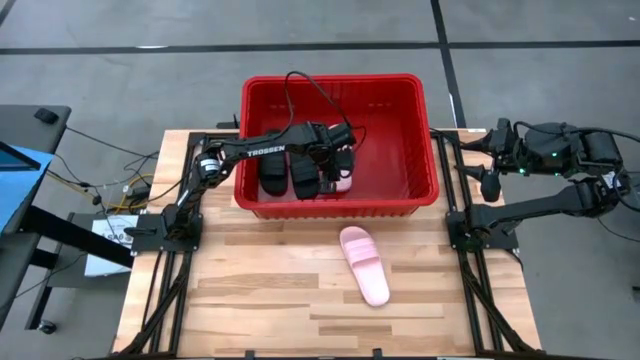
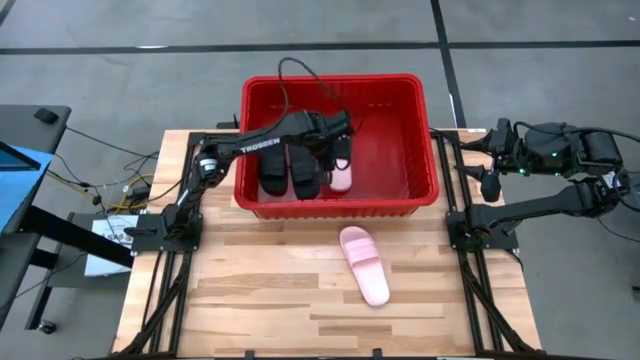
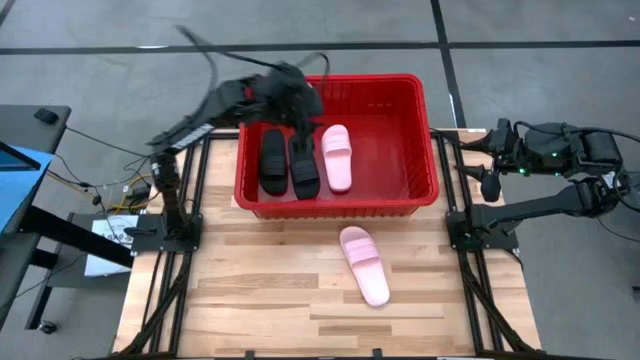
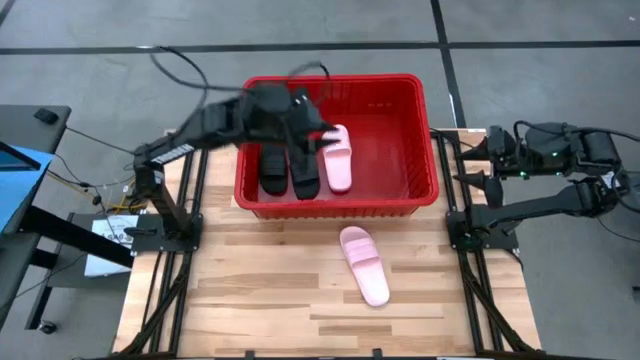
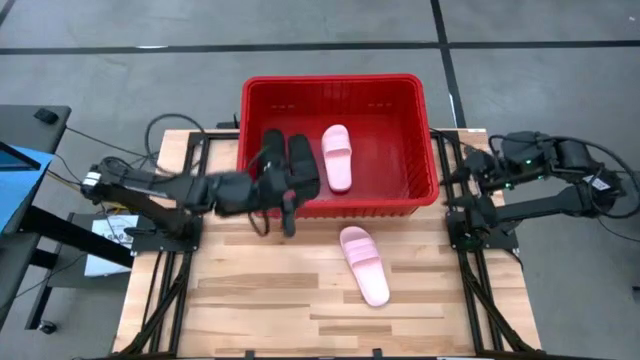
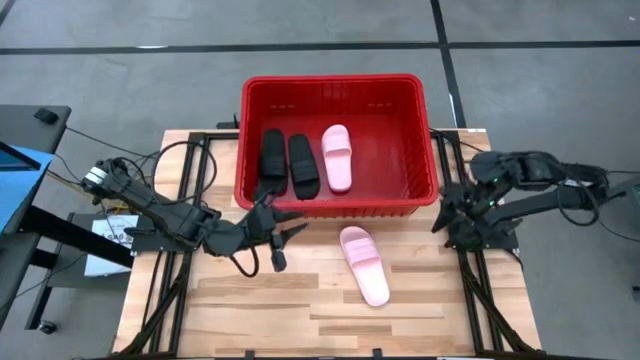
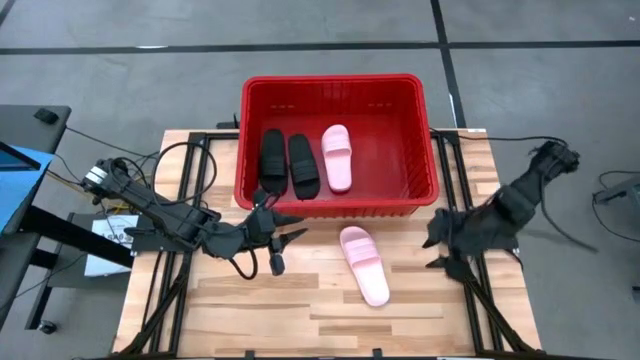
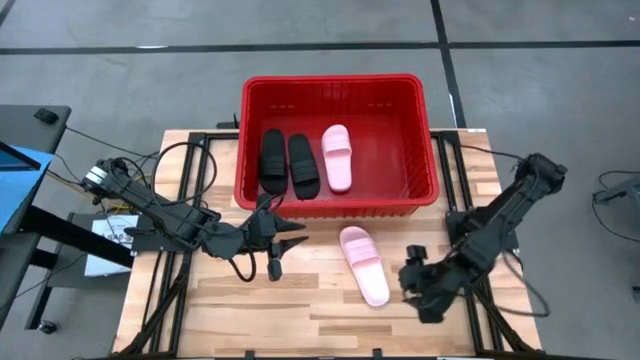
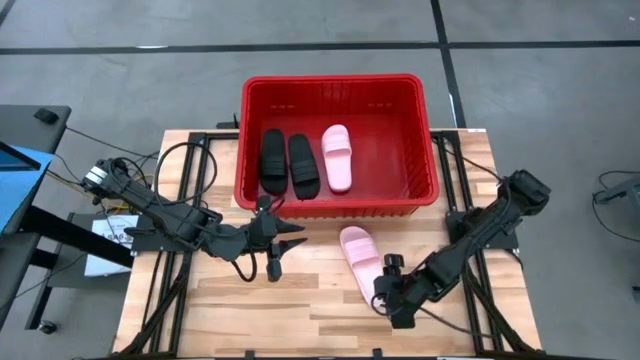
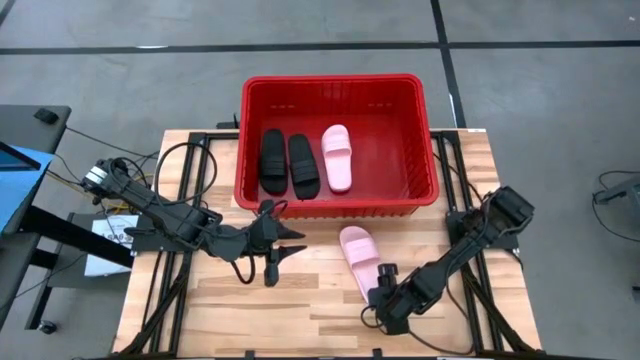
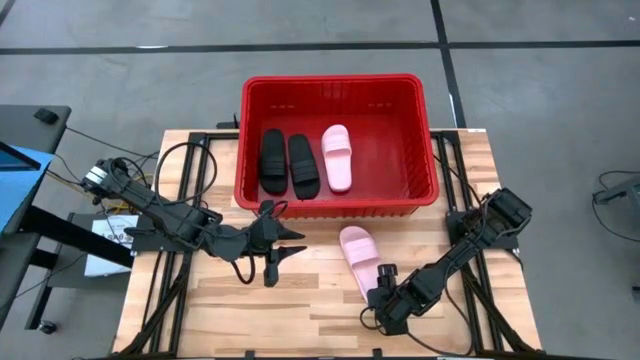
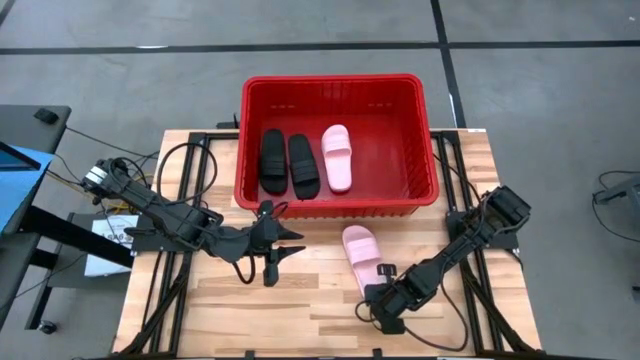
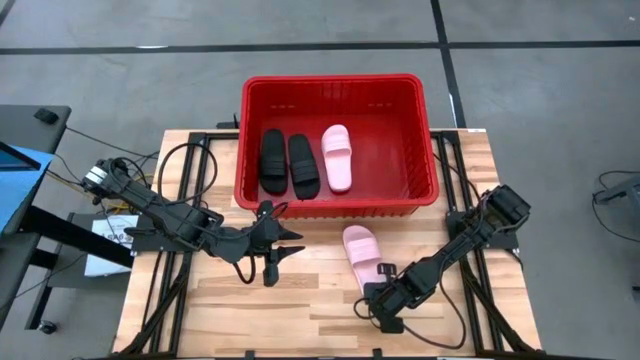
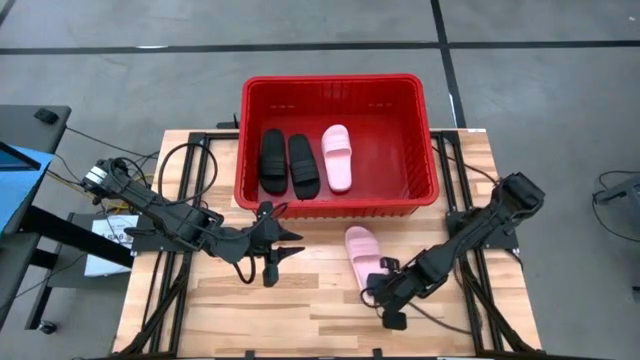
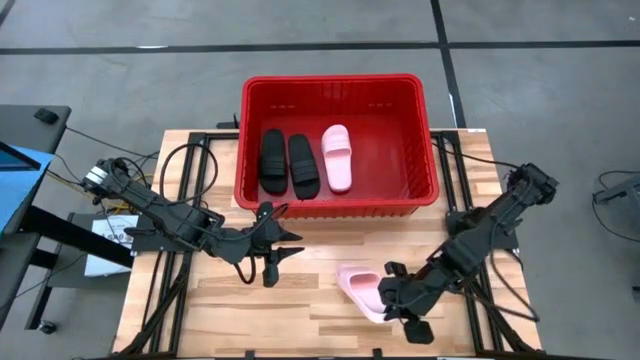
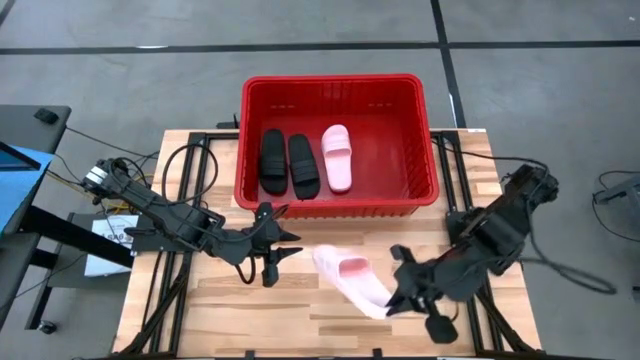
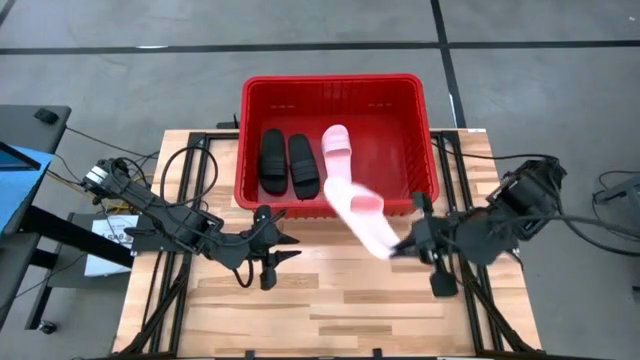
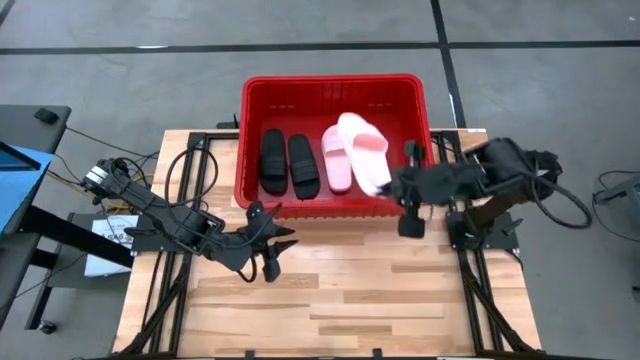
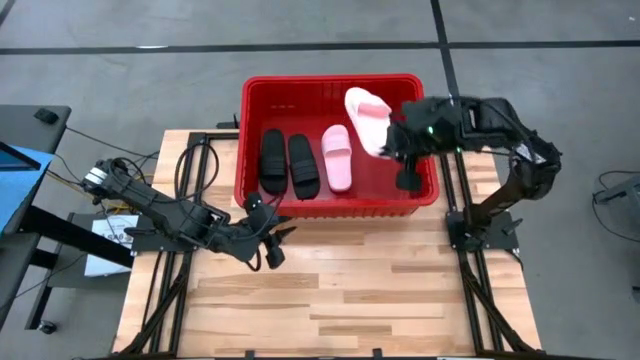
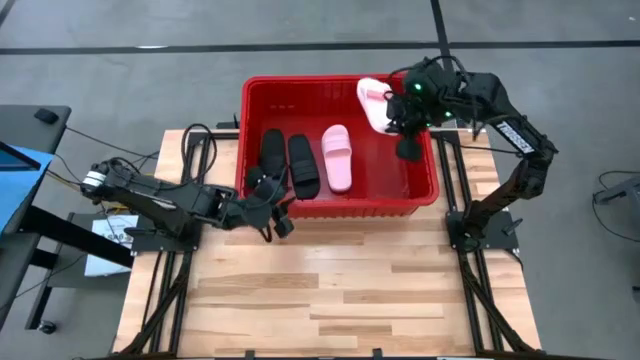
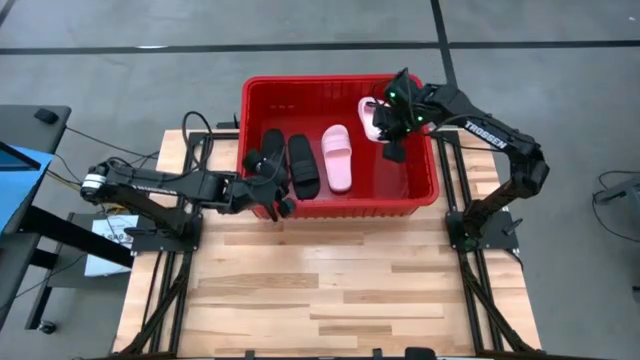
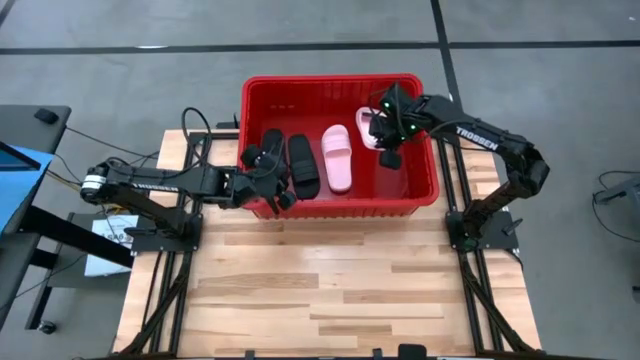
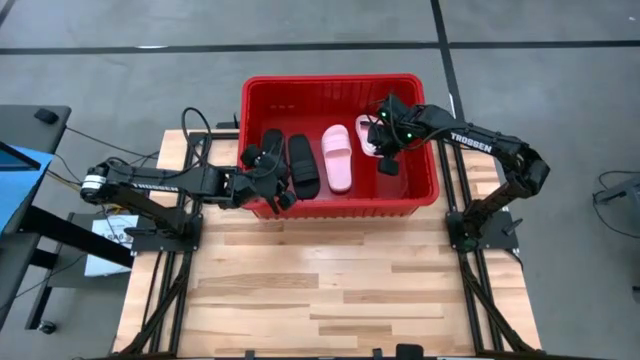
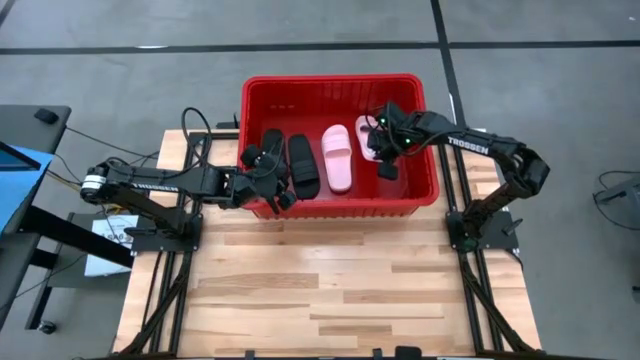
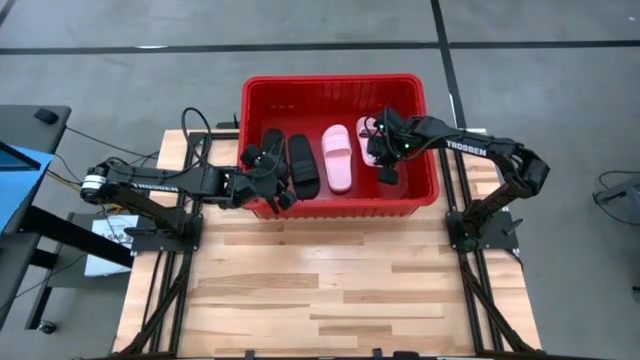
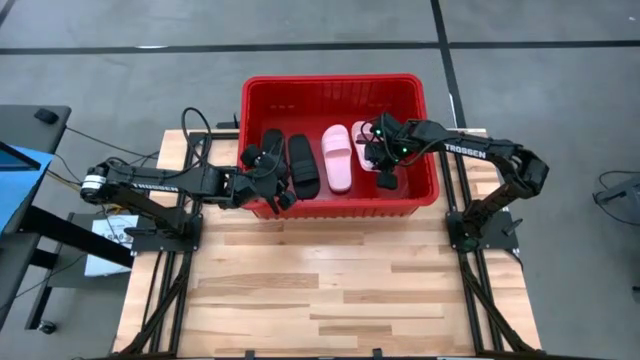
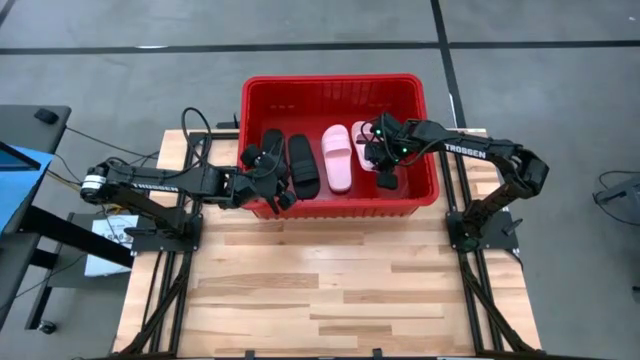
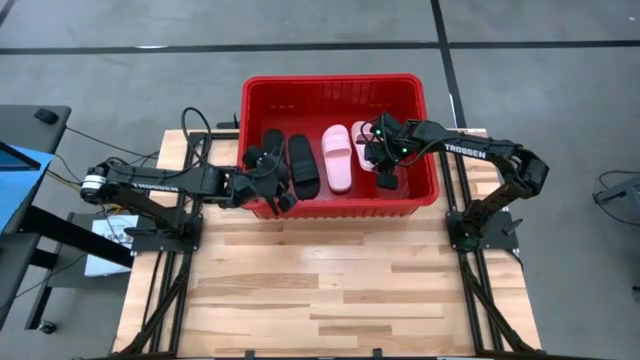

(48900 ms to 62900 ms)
Task: Pick and place slides into bin
Put the pink slide into the red bin

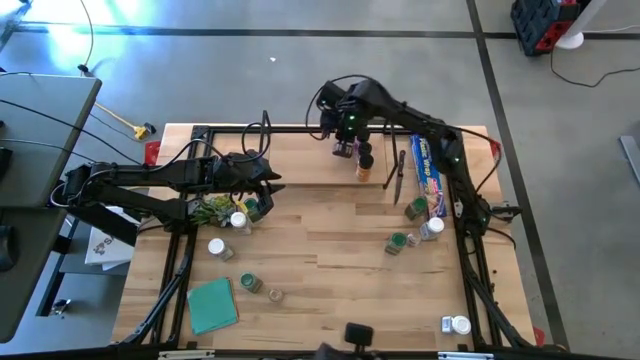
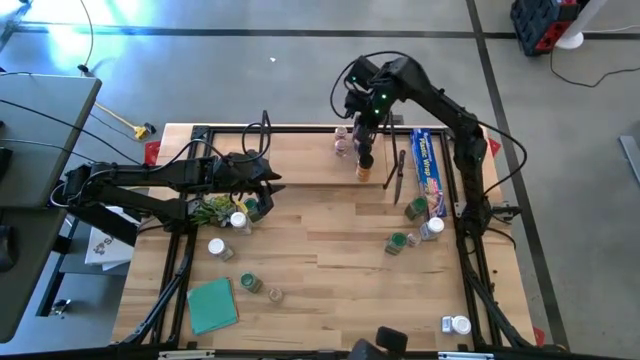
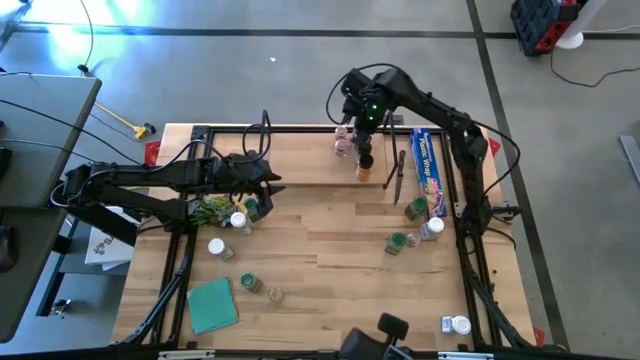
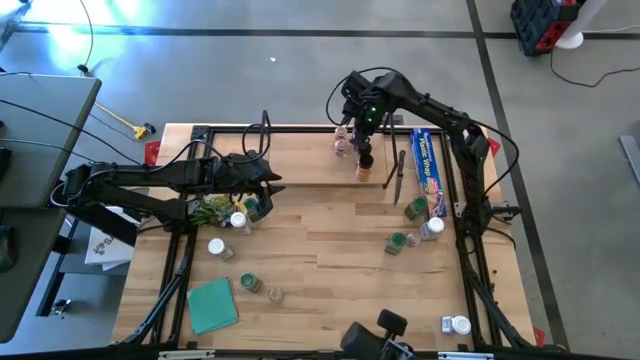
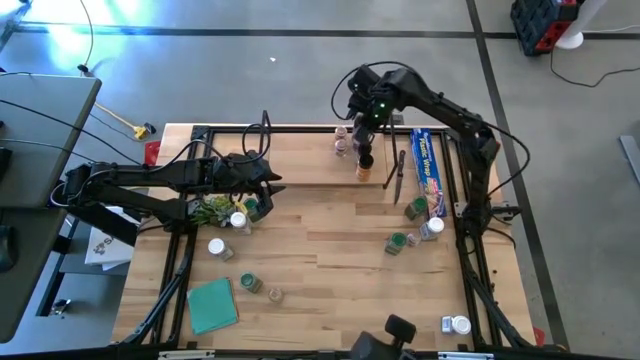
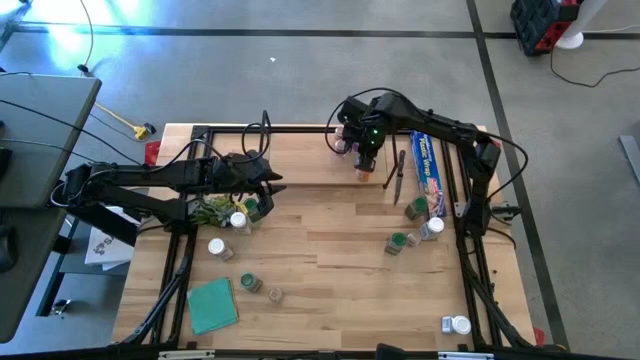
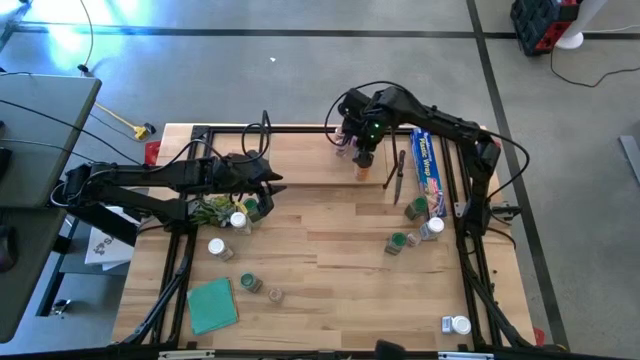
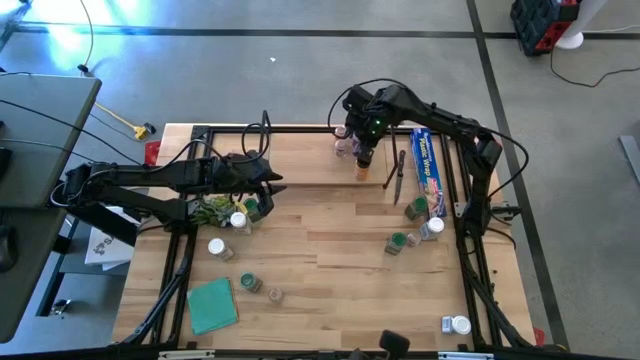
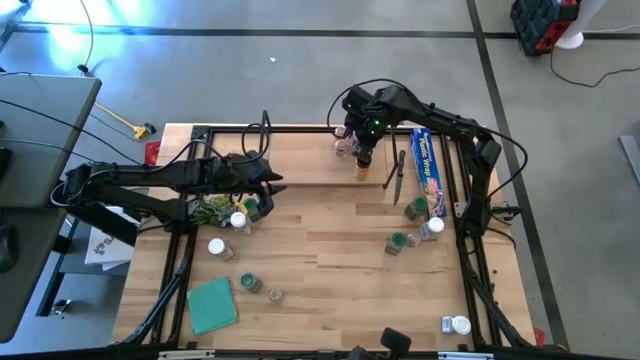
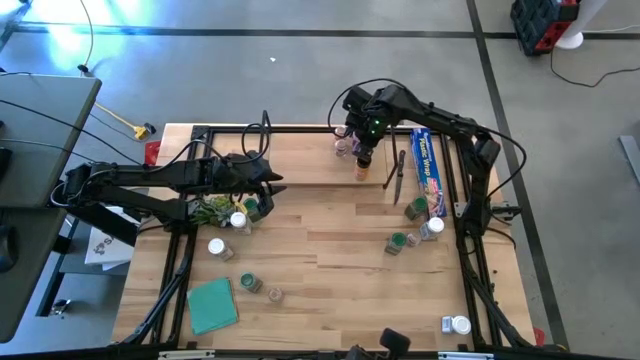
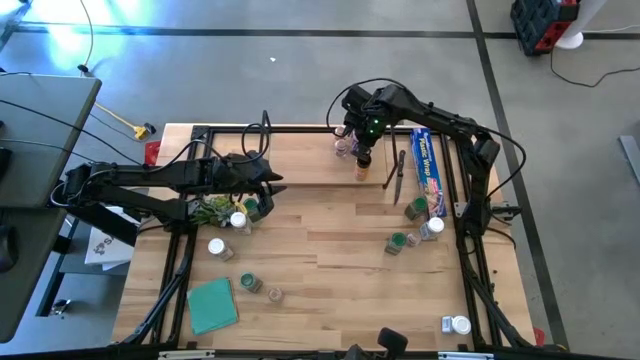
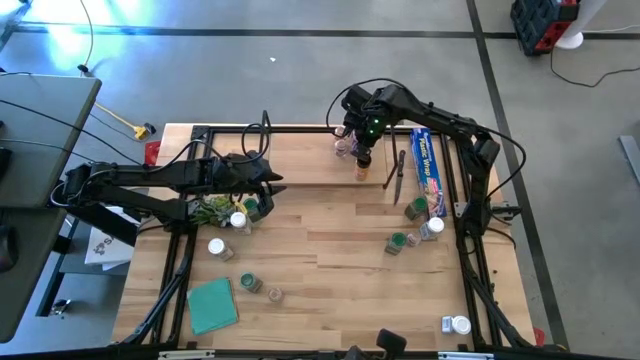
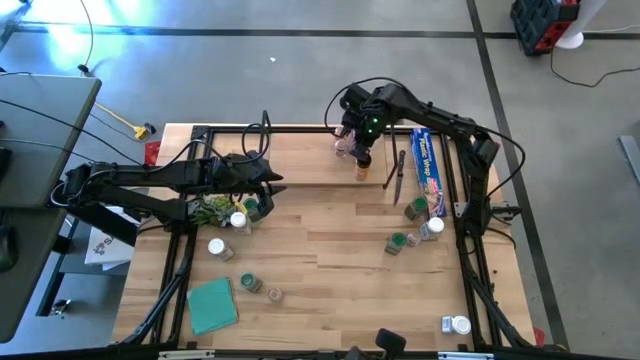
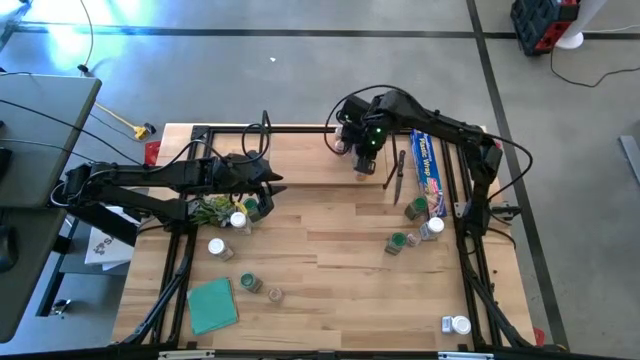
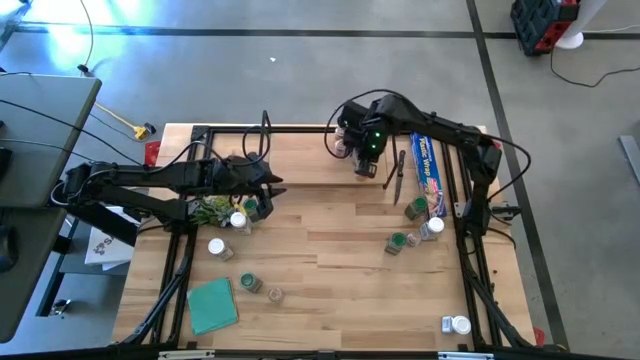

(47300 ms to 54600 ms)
Task: Shelf spices
Adjust the seasoning bottles on the shelf
